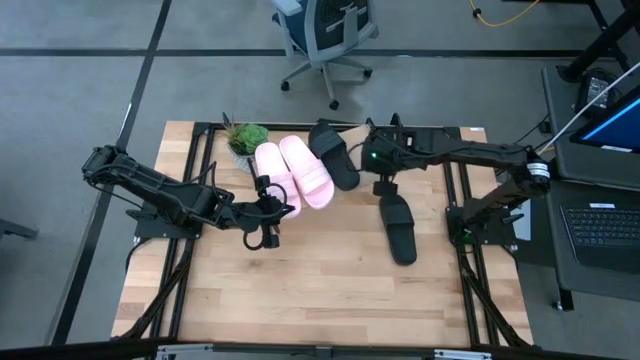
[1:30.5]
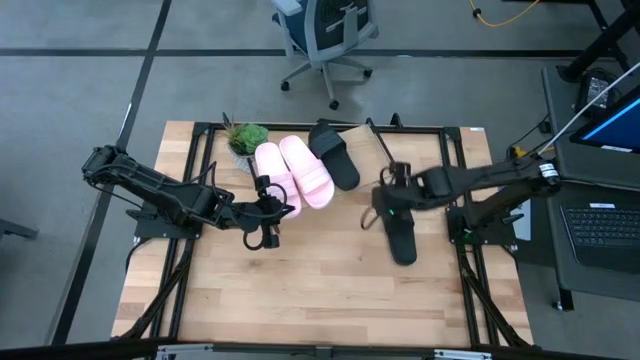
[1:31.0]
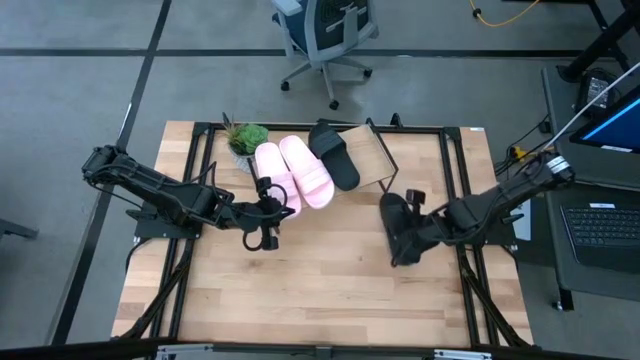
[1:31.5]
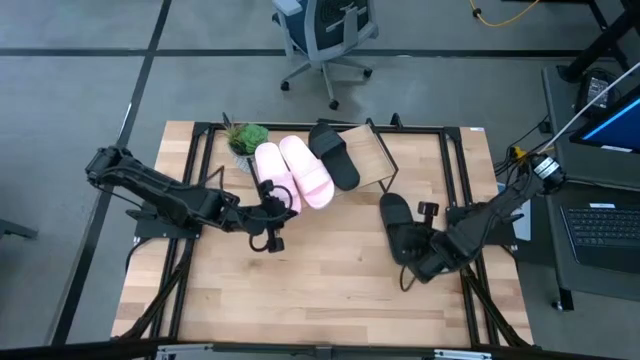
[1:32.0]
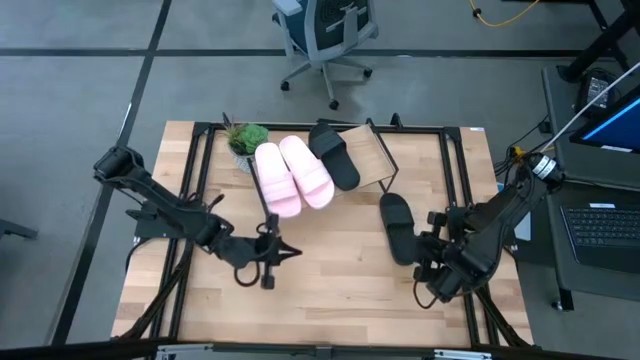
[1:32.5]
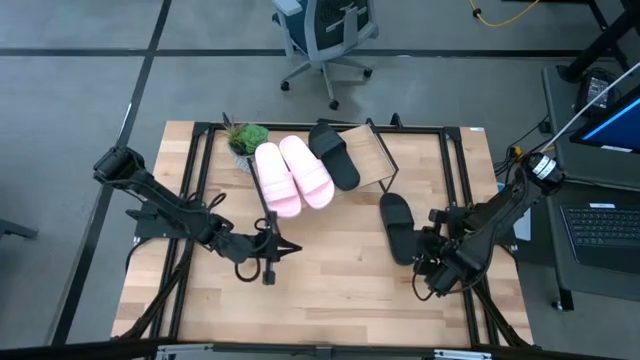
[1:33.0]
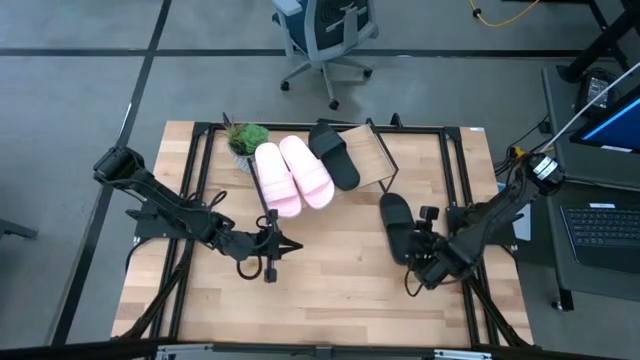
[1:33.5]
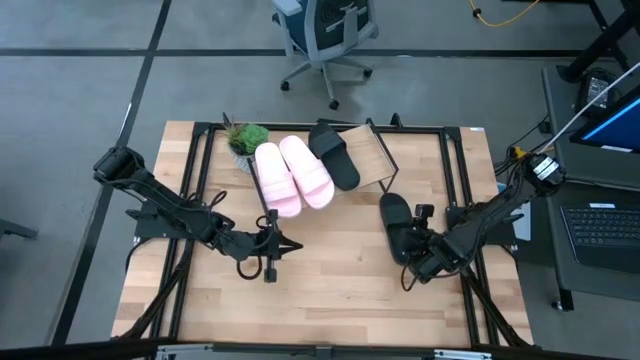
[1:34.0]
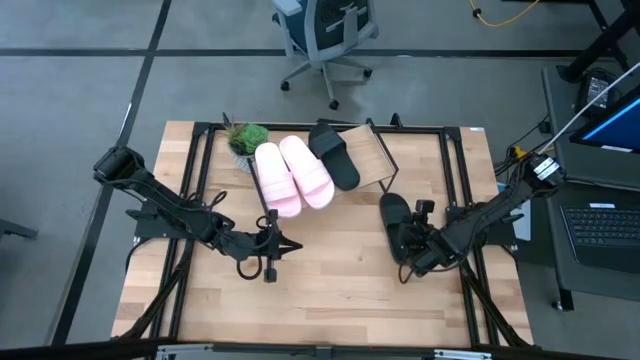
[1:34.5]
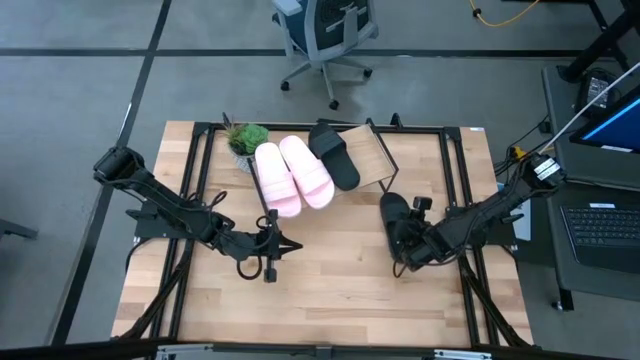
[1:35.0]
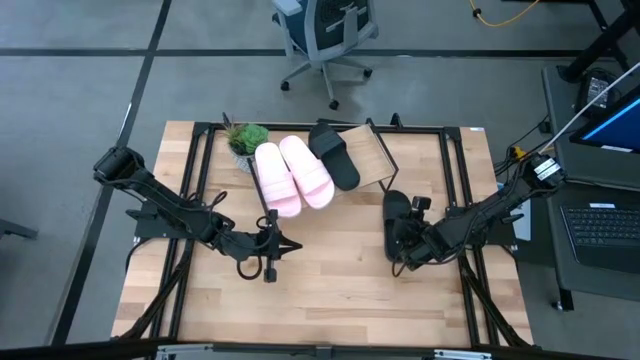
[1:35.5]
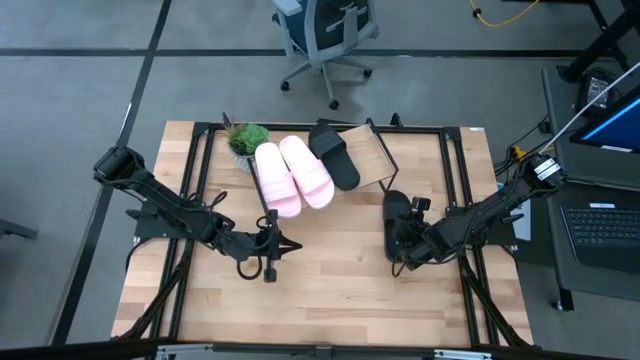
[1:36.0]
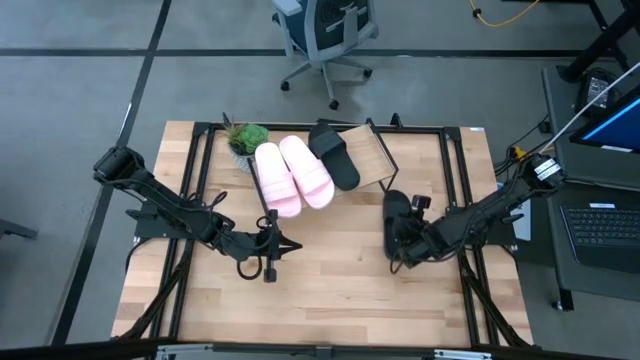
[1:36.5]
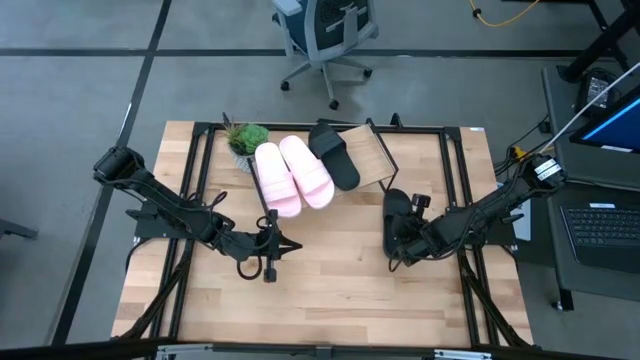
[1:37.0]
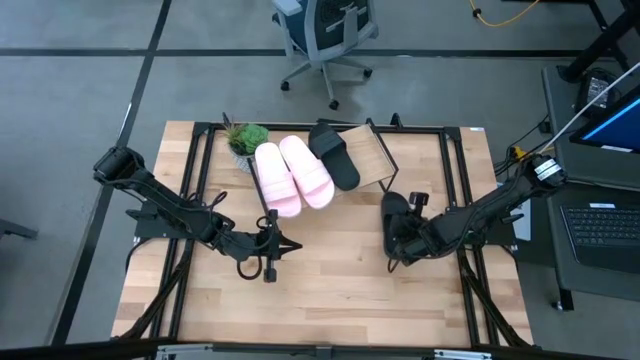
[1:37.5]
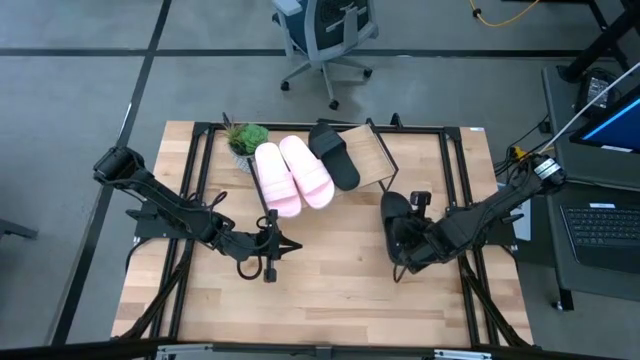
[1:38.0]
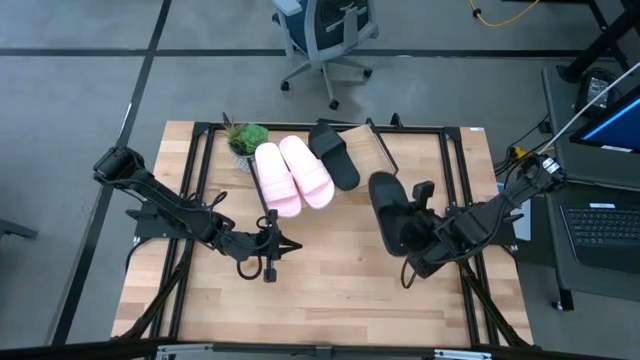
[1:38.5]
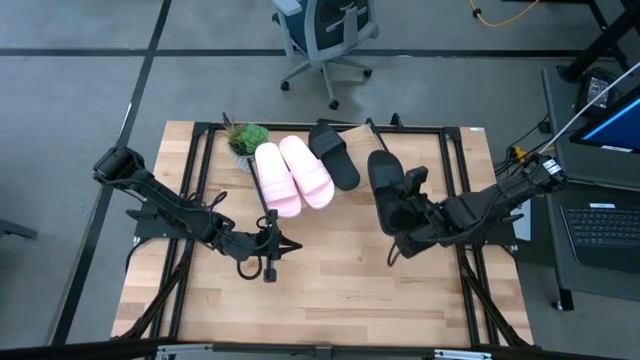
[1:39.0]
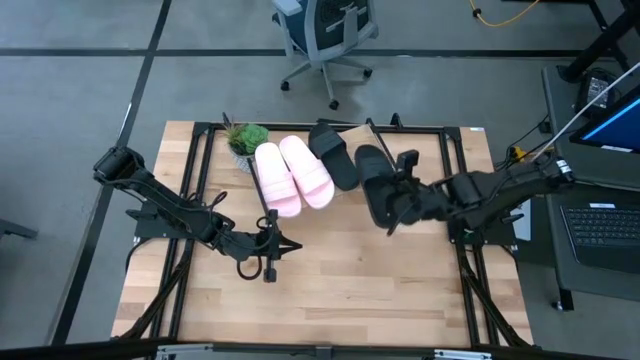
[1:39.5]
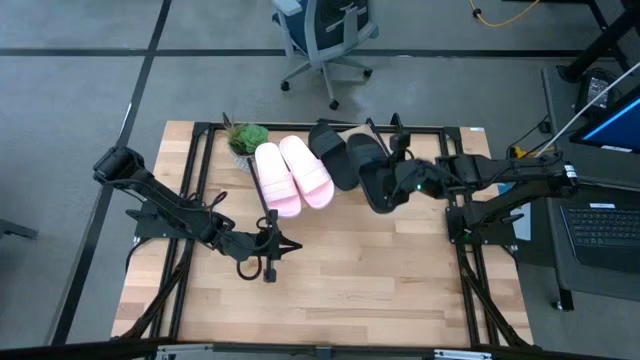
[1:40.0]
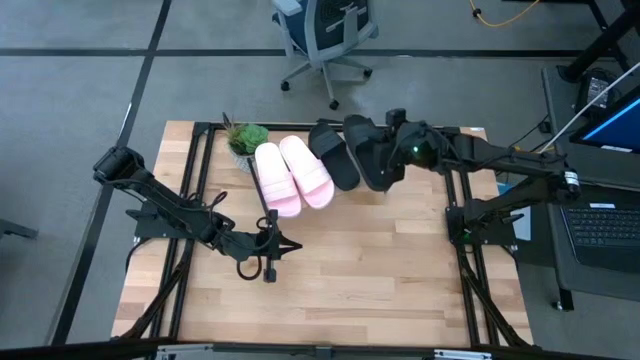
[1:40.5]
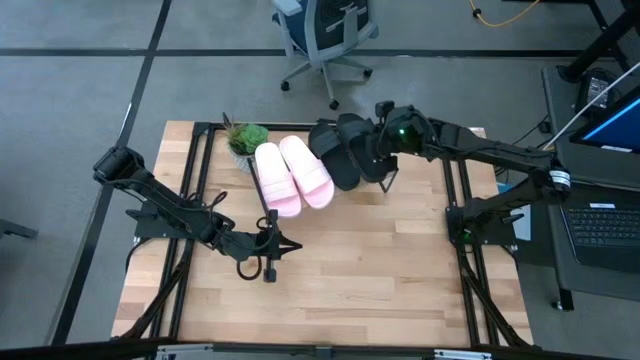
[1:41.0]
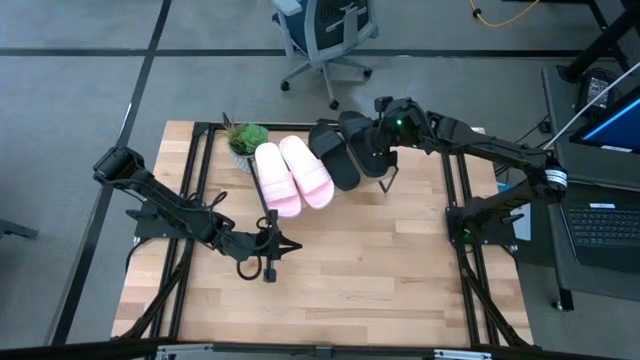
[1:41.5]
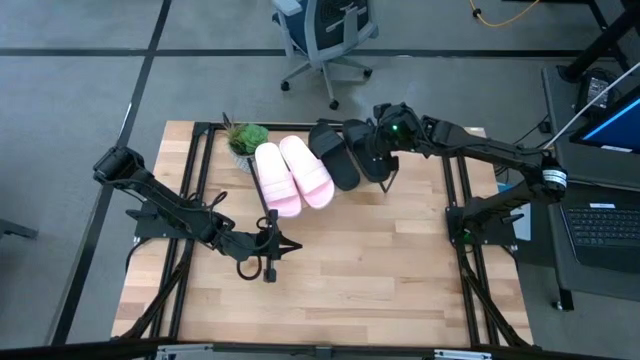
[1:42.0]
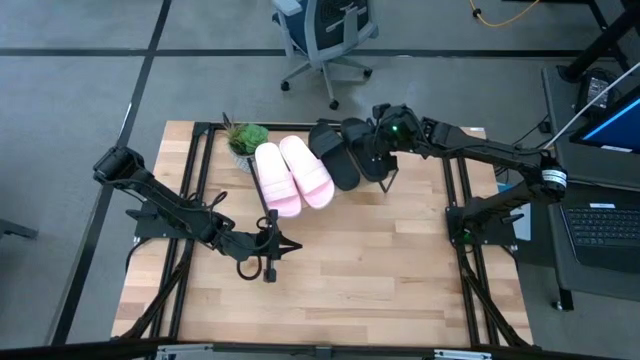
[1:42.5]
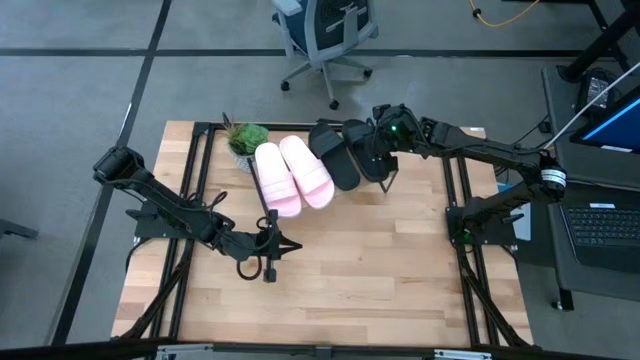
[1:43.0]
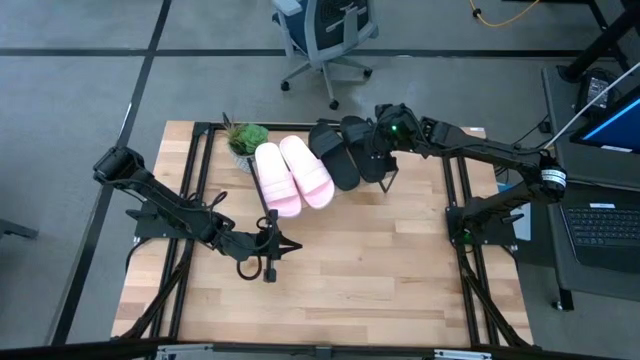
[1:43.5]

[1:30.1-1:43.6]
Task: Pick and place slides into the shelf
Put the black slide on the shelf

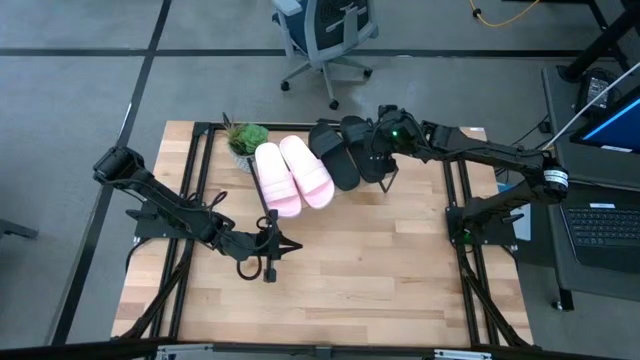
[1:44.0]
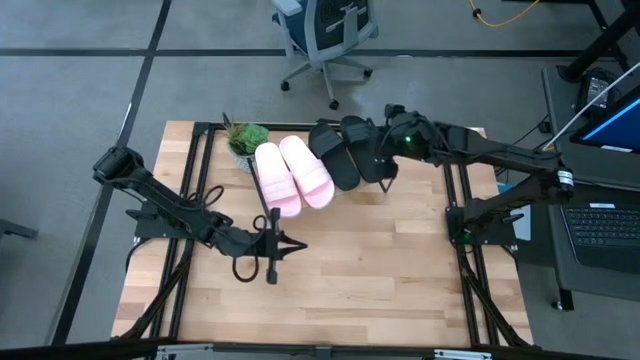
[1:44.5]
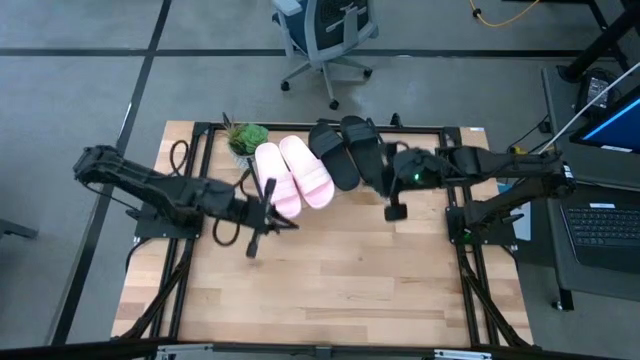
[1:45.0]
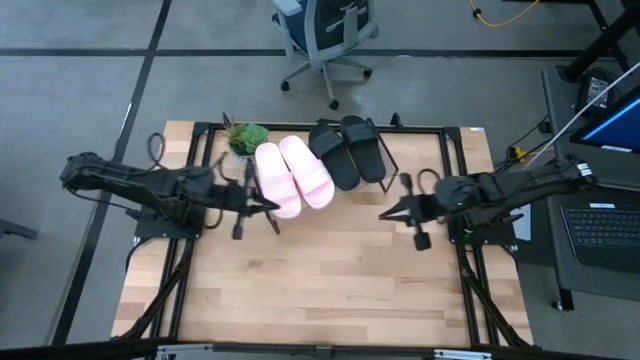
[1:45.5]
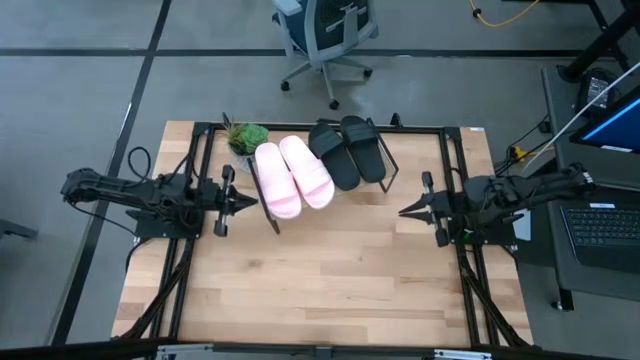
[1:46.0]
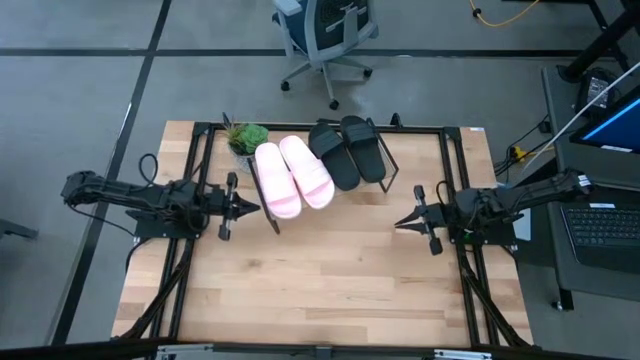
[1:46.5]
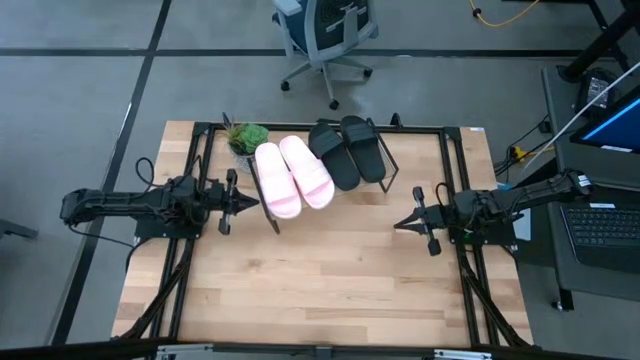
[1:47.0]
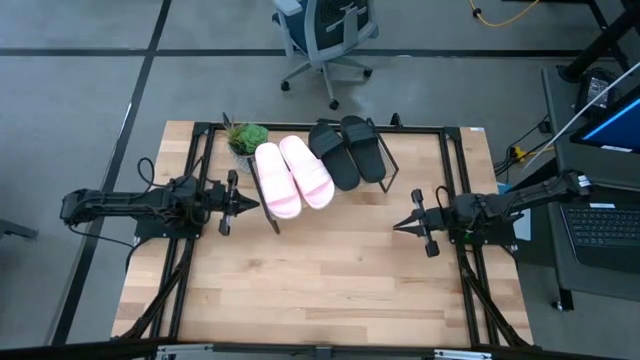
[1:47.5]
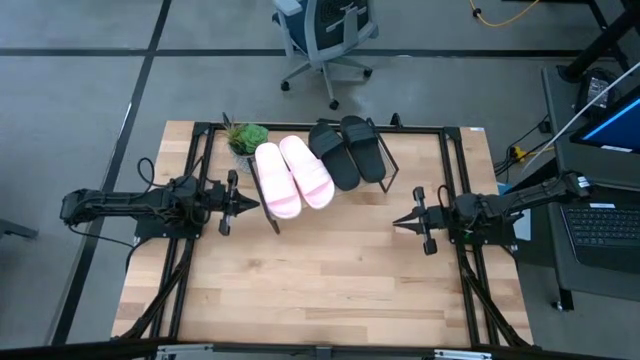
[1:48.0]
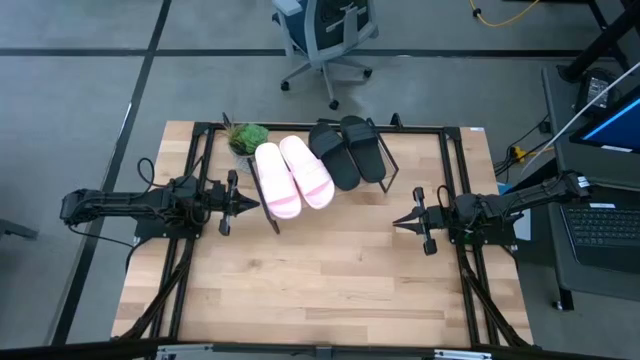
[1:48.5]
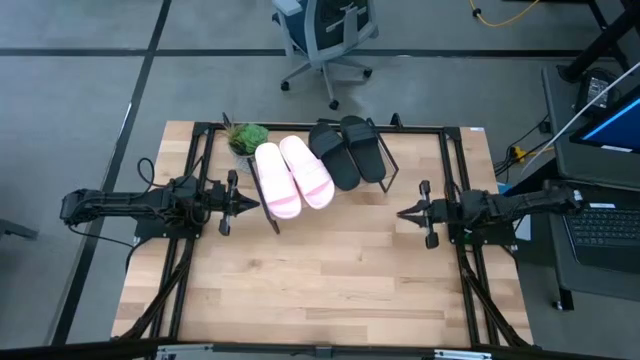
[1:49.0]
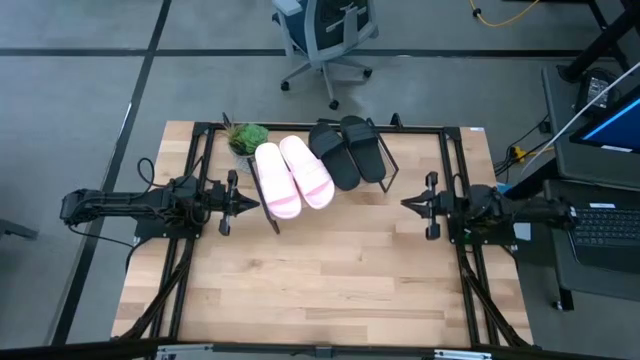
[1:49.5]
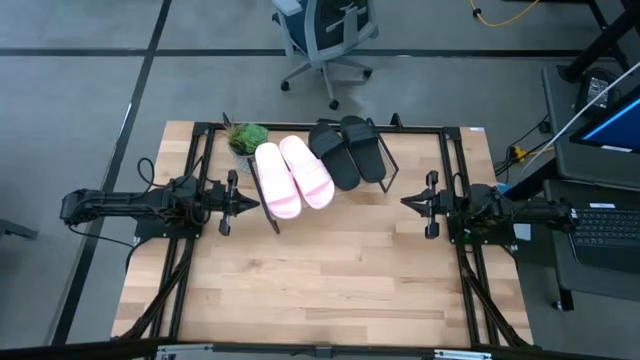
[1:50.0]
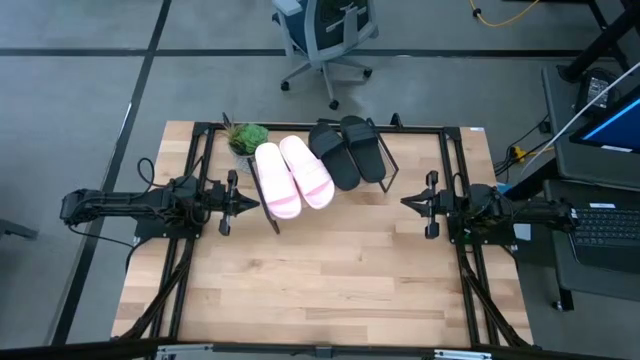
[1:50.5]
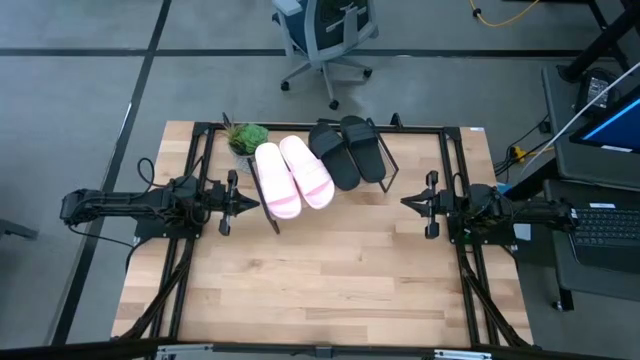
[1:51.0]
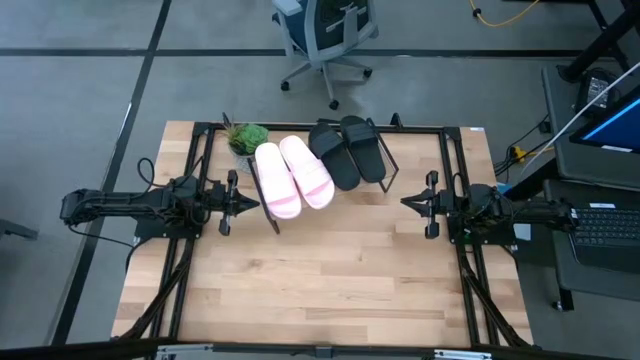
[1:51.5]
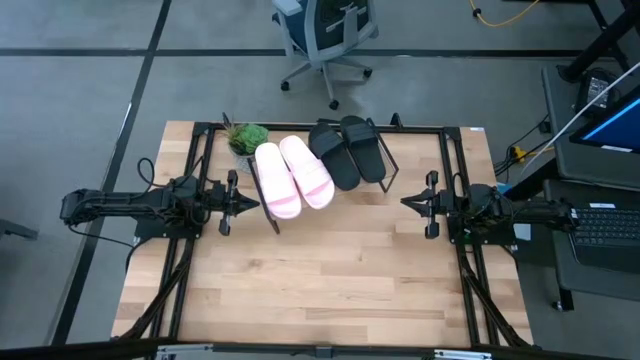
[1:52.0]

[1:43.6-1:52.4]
Return to Home Position
